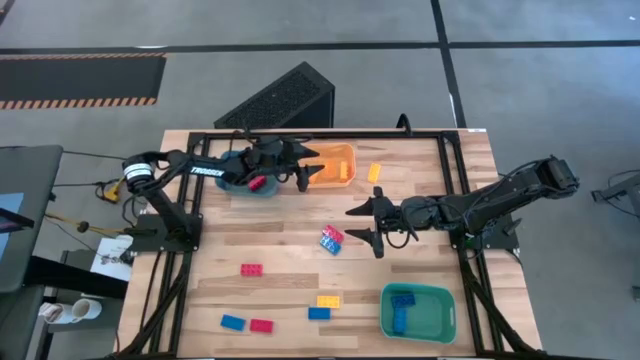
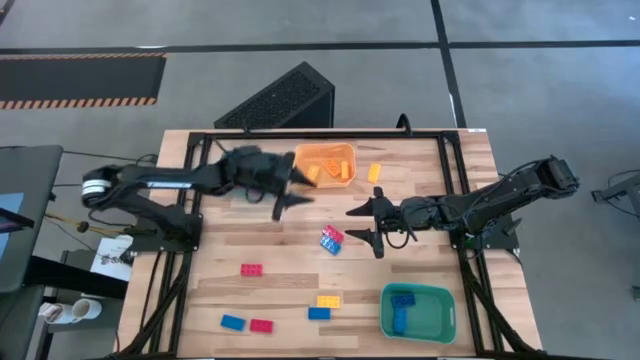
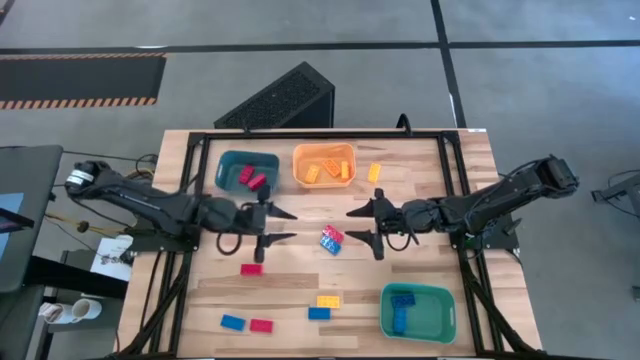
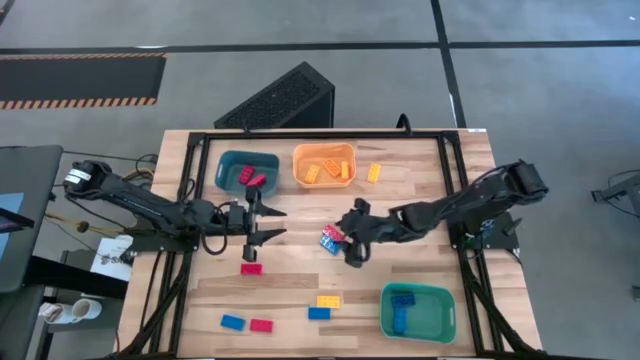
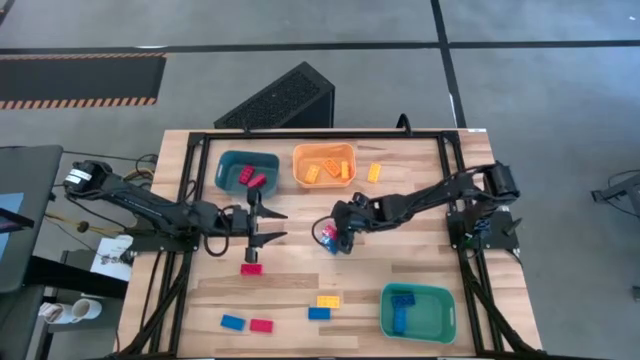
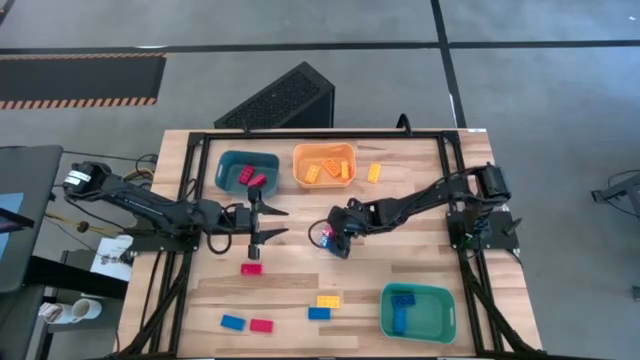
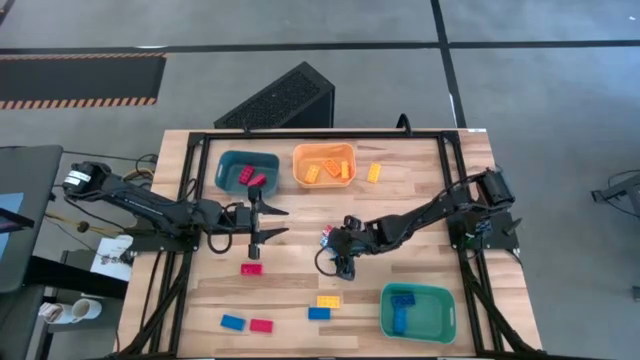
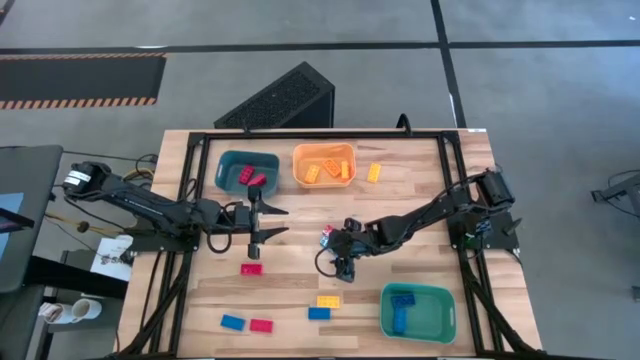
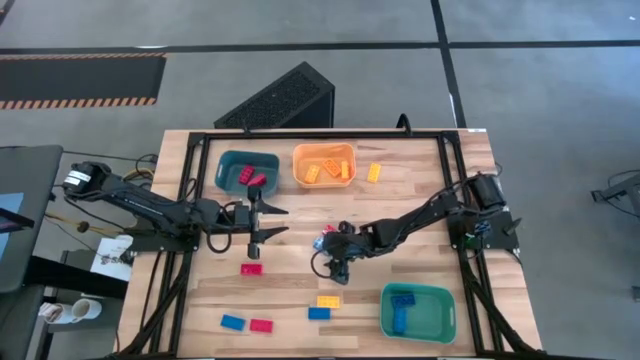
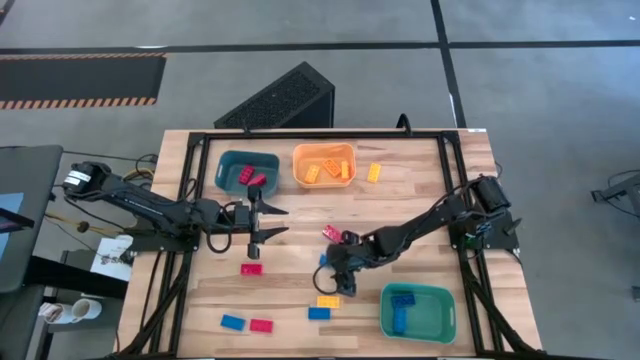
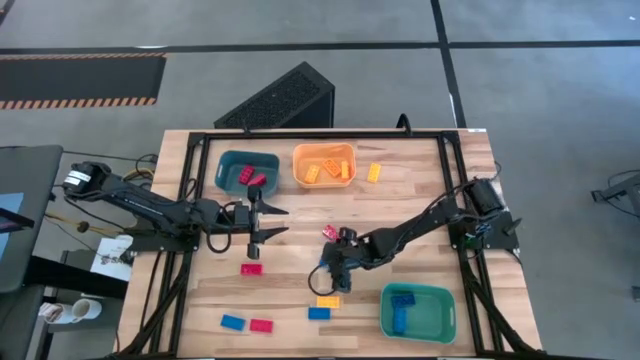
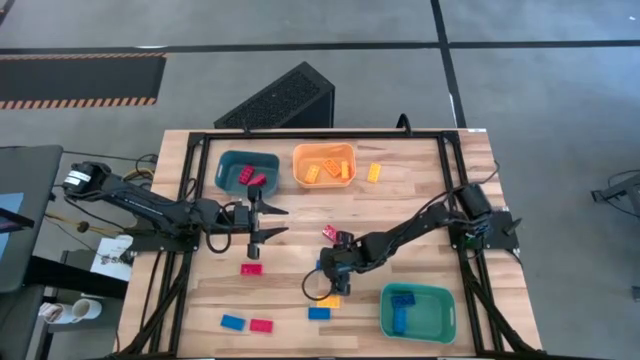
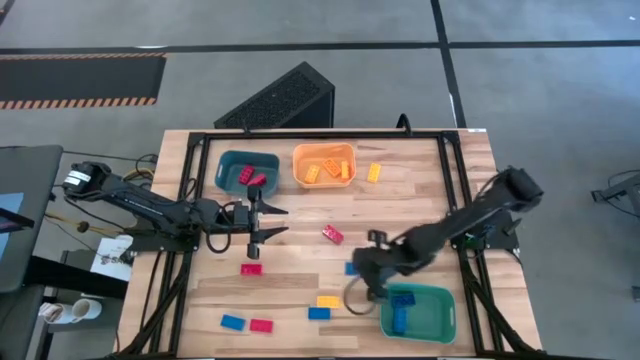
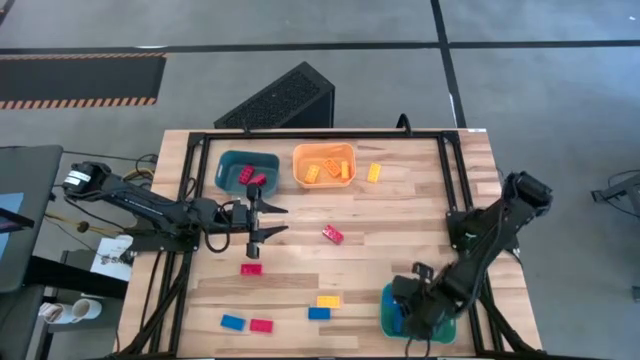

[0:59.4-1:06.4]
Task: Sort & place blocks by color
Put the blue game piece into the green bin

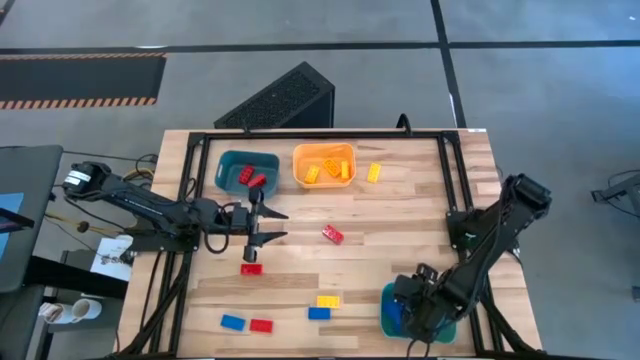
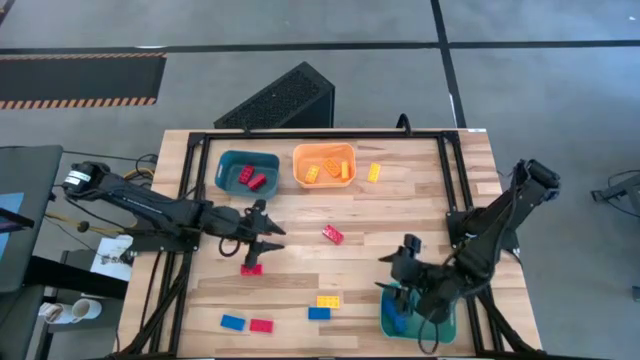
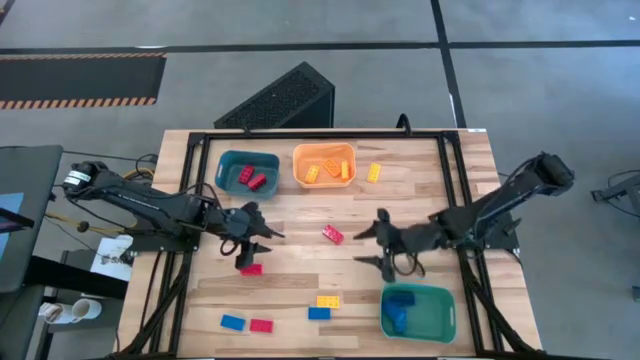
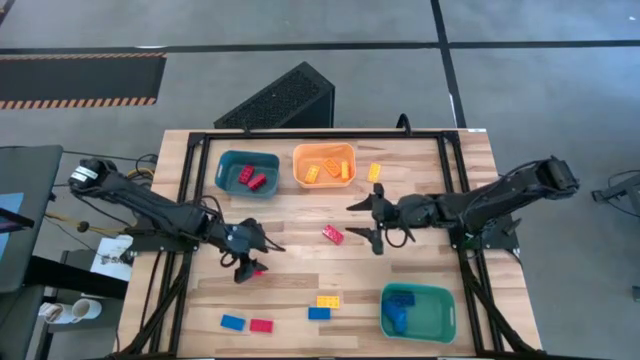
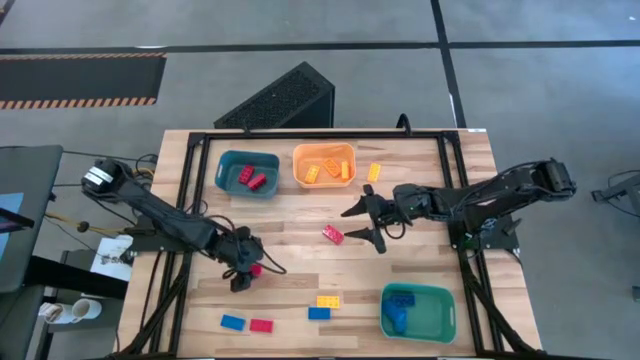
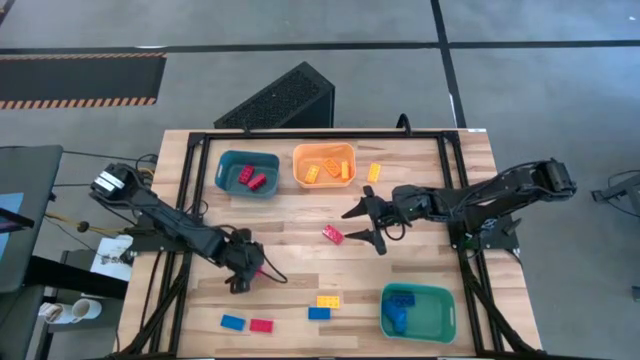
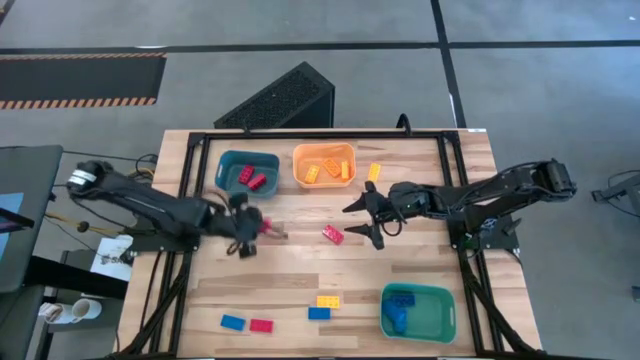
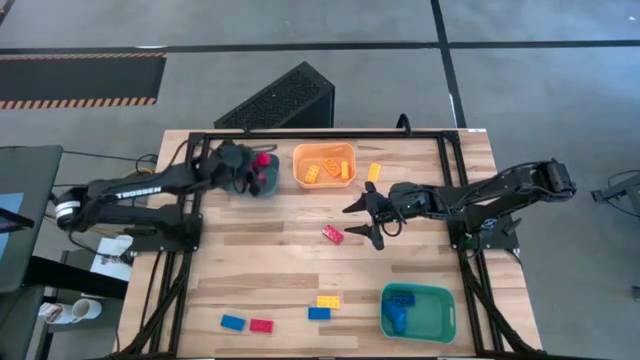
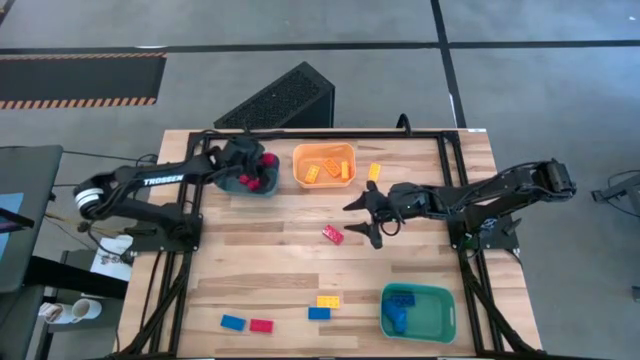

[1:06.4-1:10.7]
Put the red game piece into the blue bin

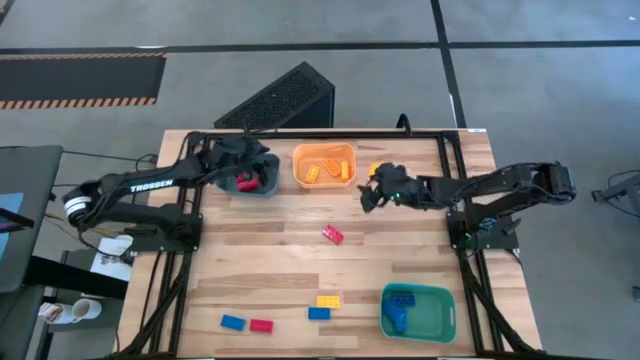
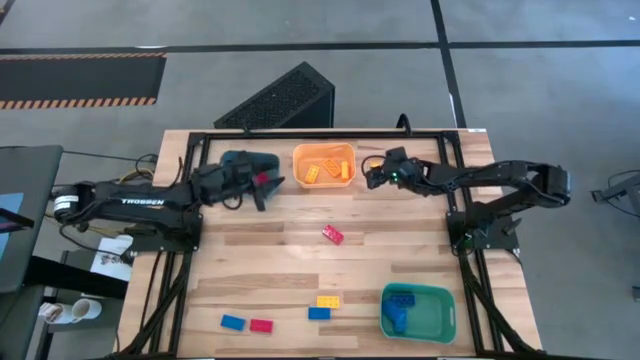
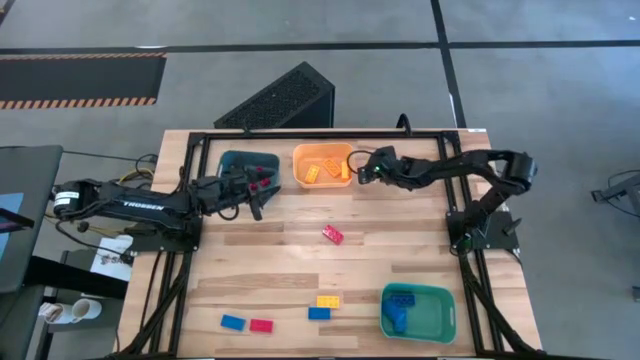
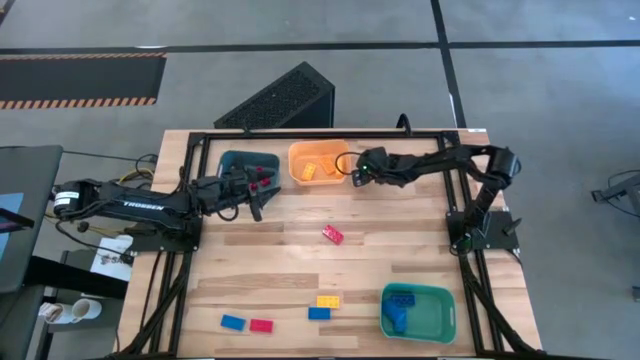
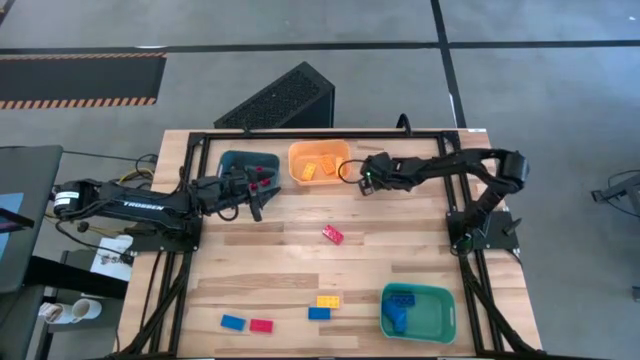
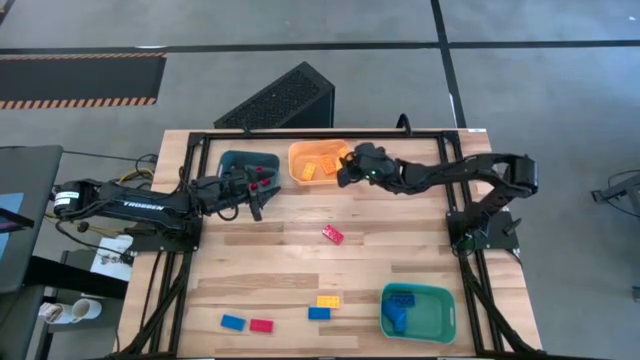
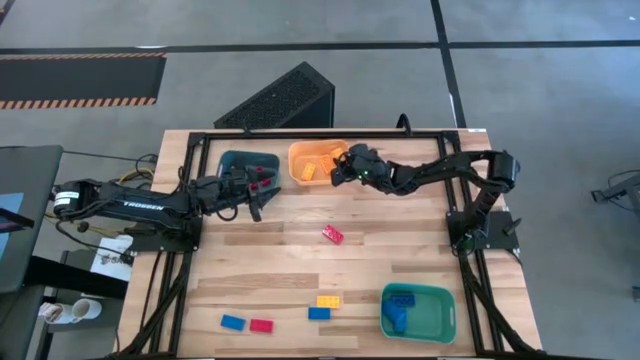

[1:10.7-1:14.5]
Put the yellow game piece into the yellow bin

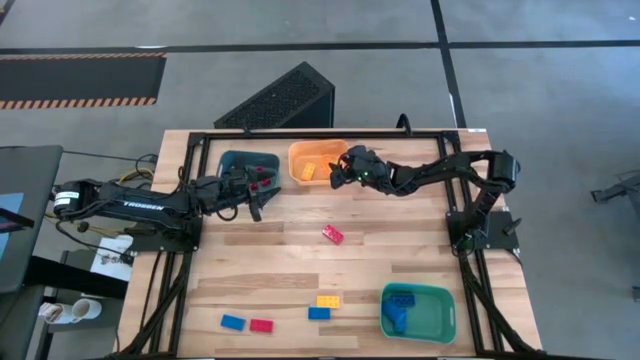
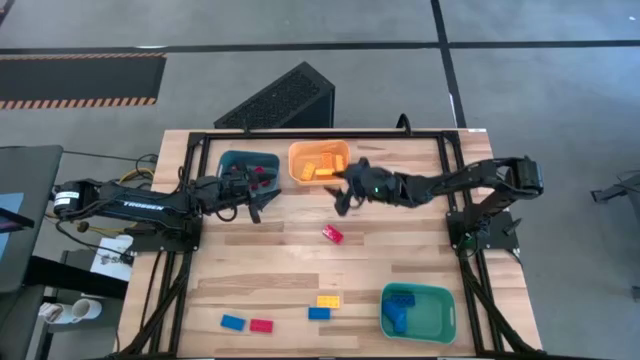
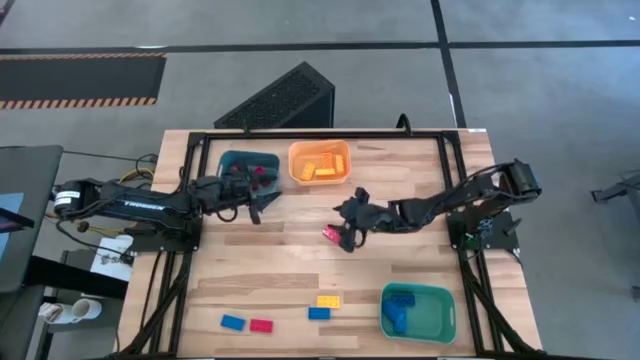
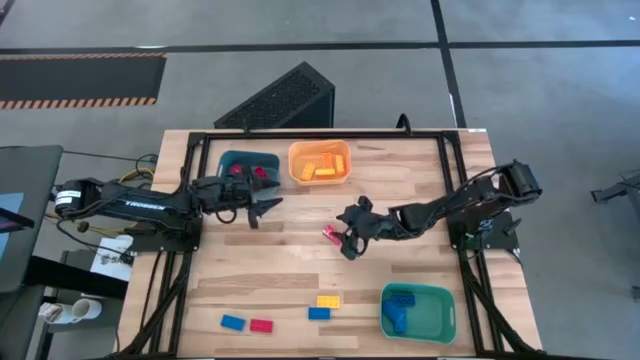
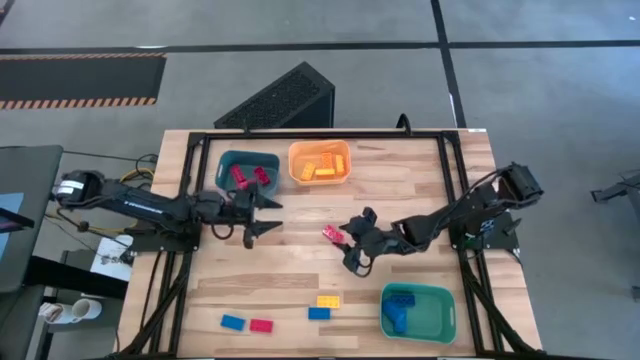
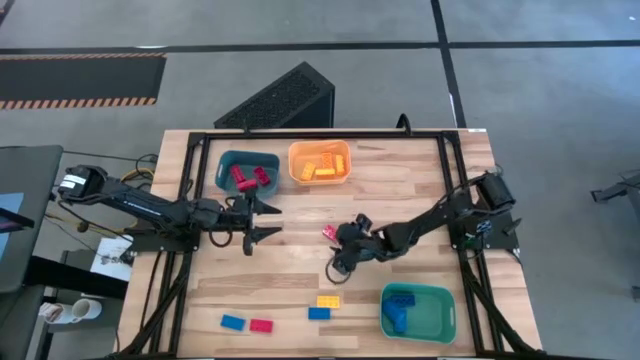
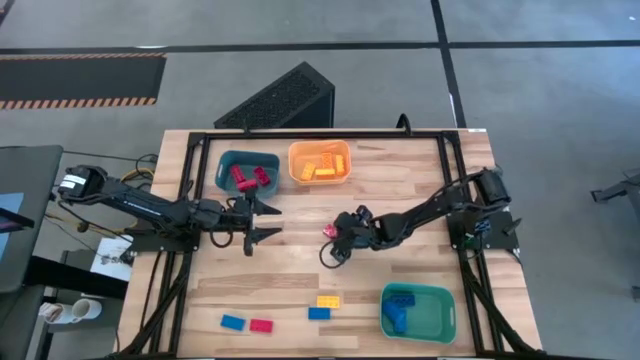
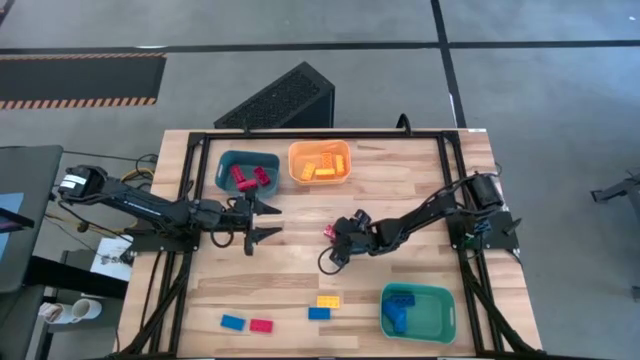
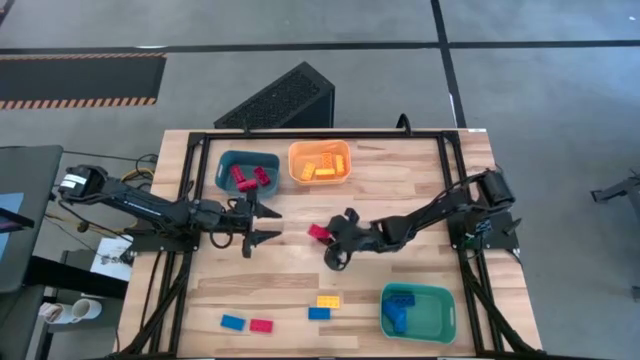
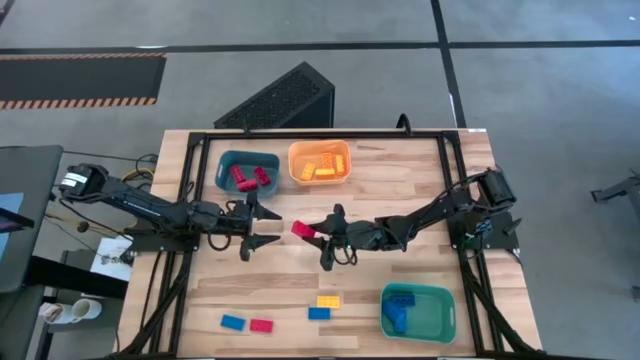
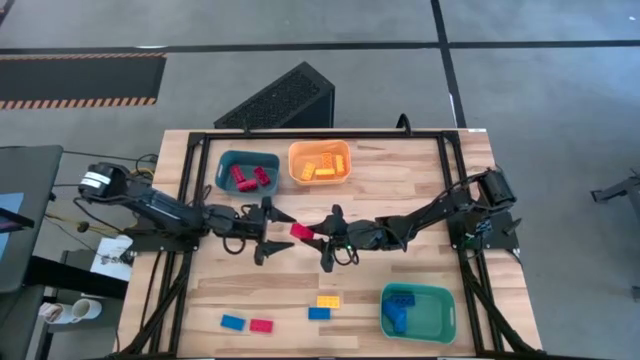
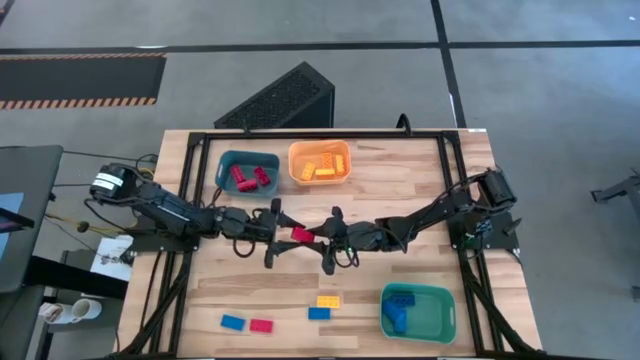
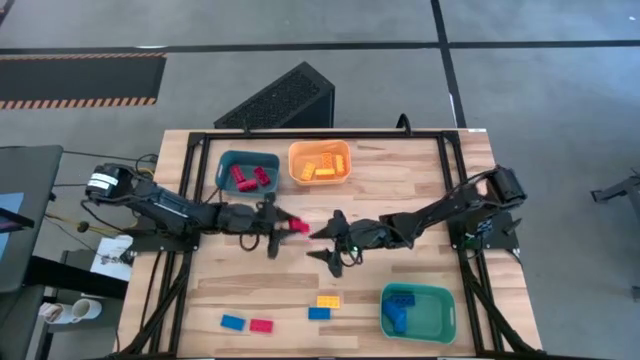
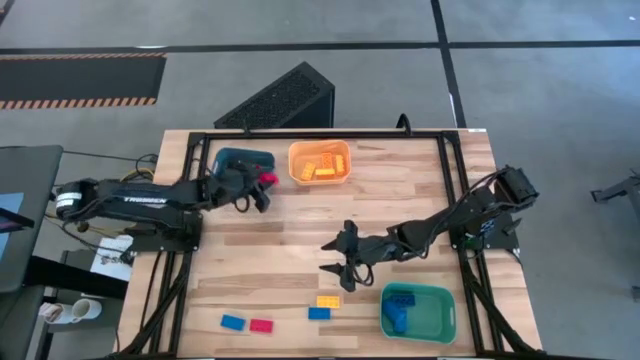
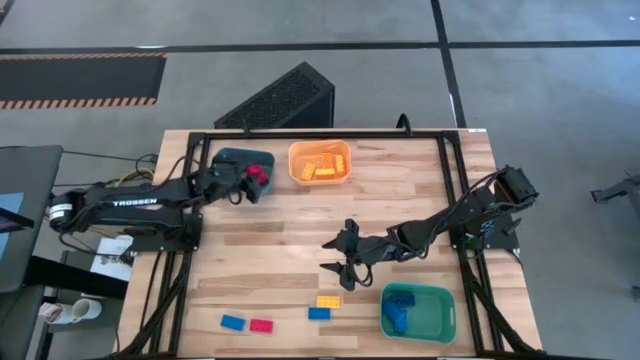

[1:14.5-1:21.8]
Put the red game piece into the blue bin
